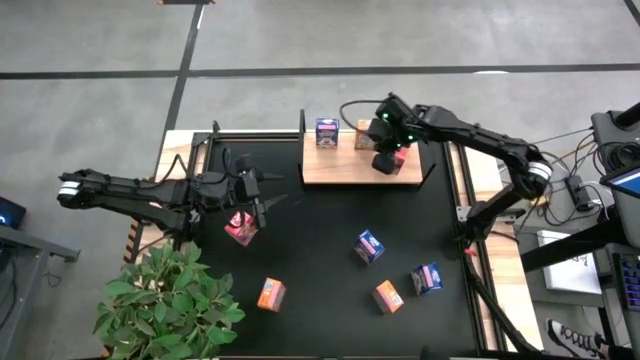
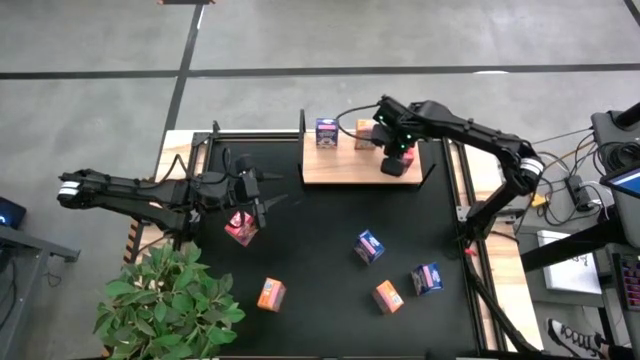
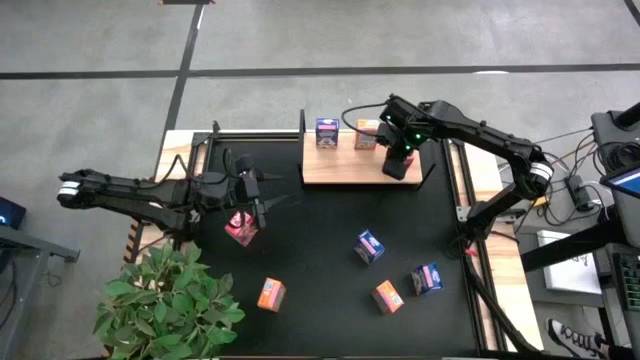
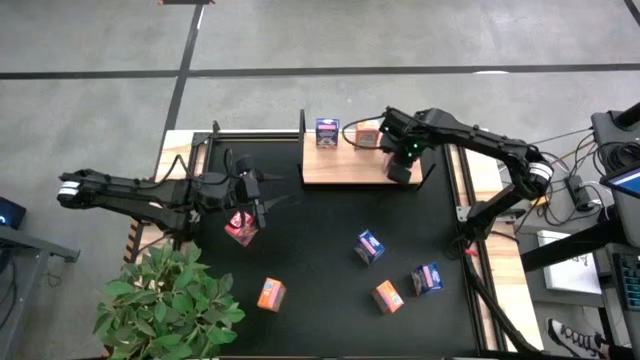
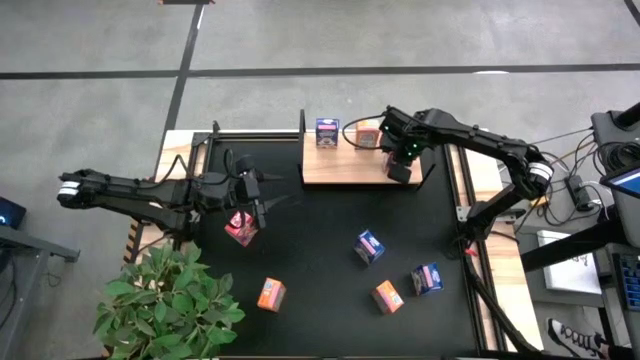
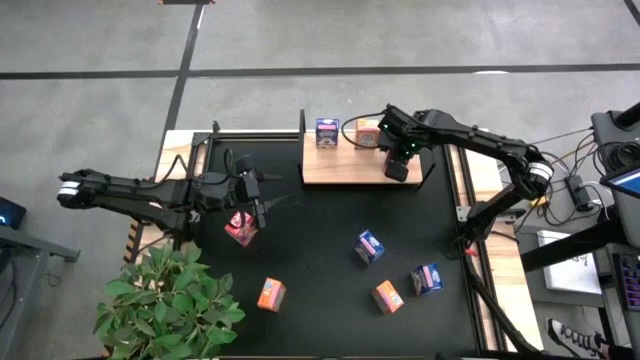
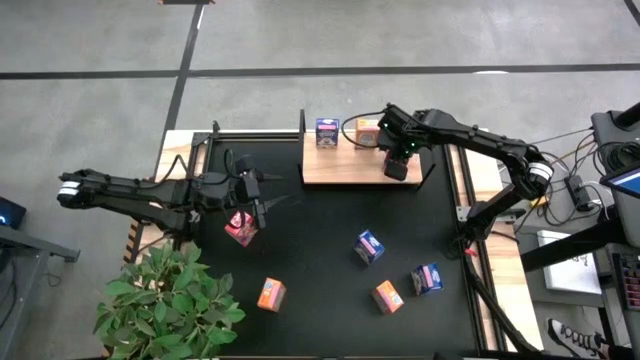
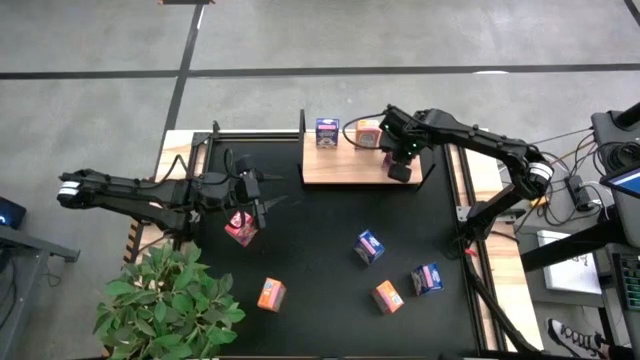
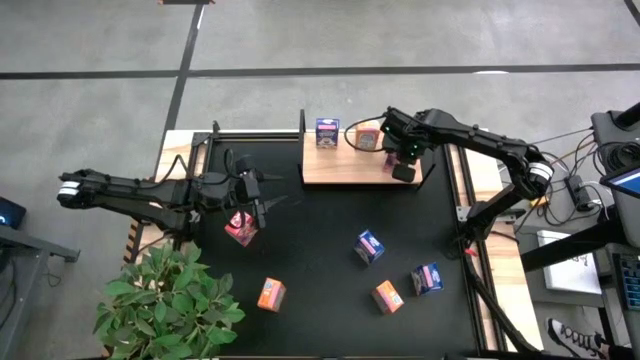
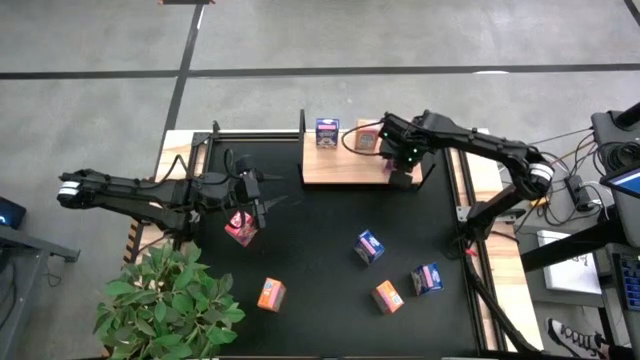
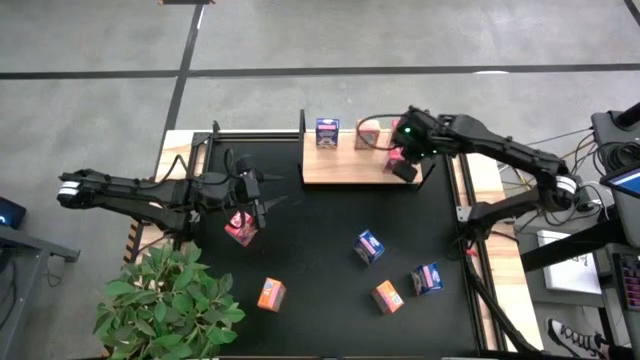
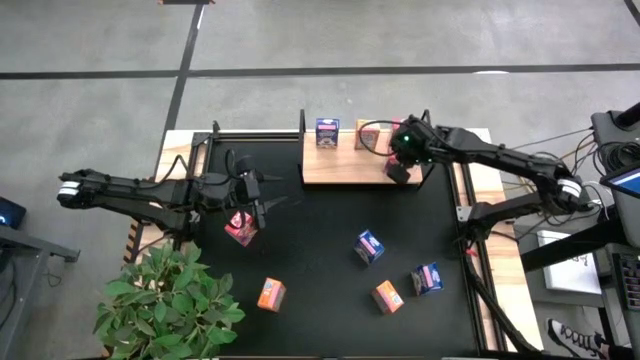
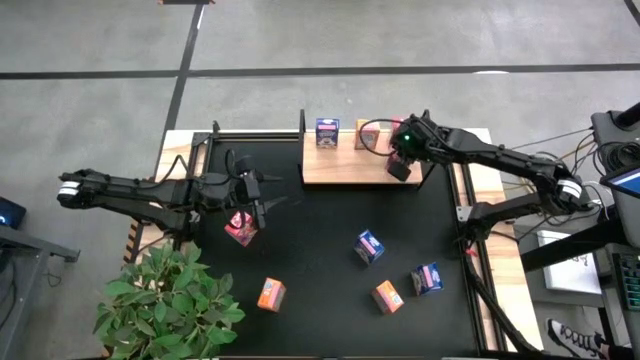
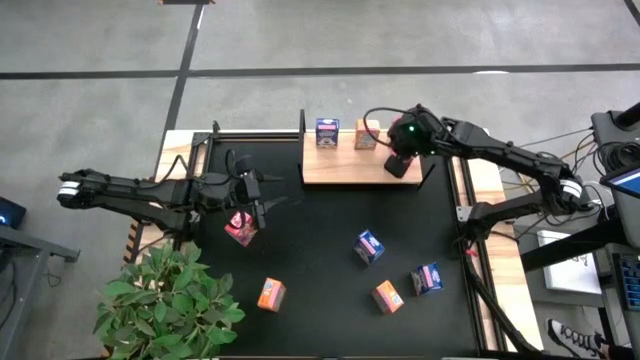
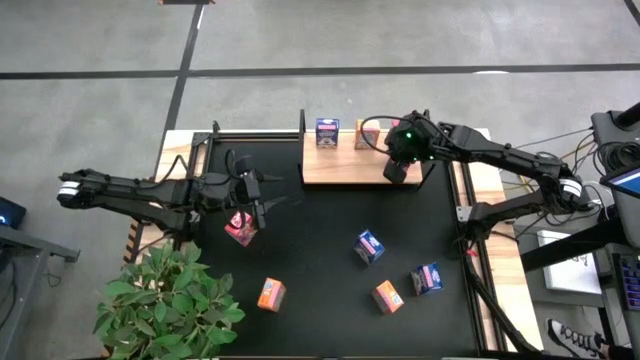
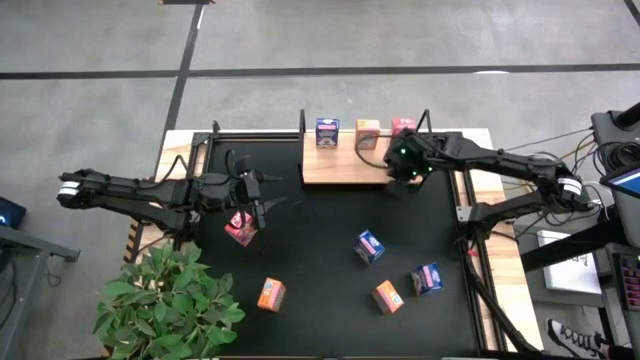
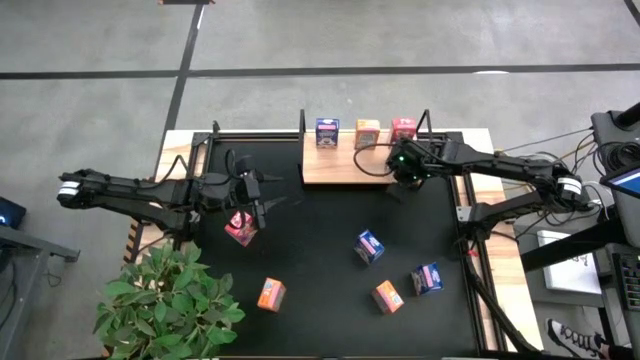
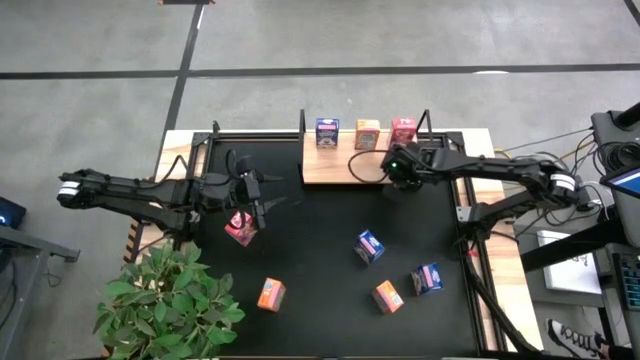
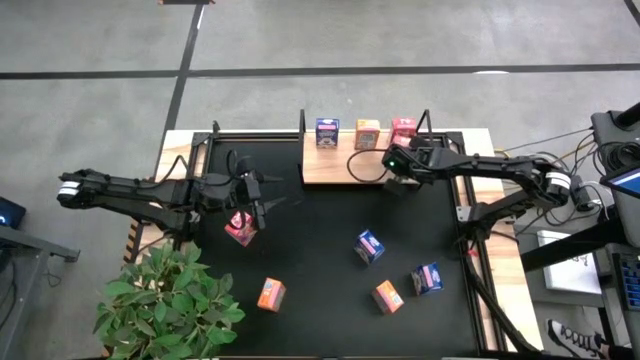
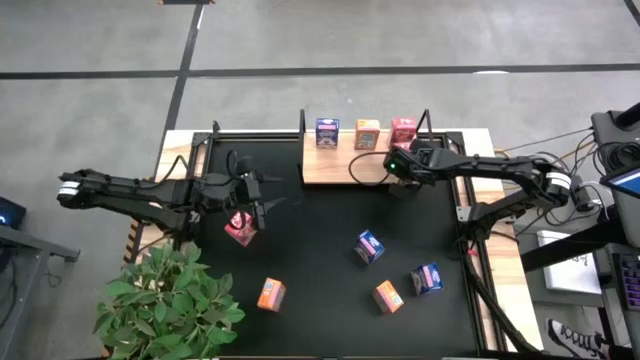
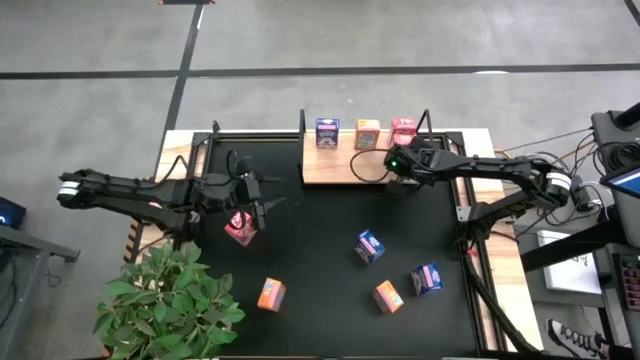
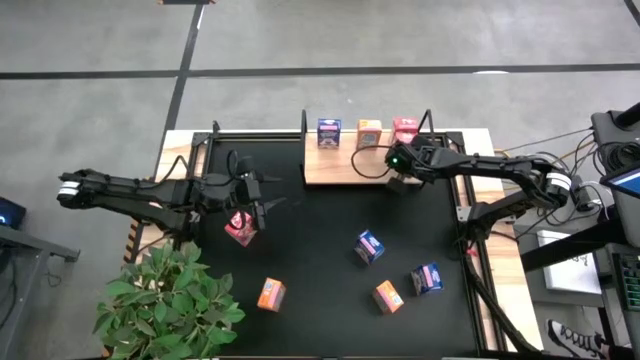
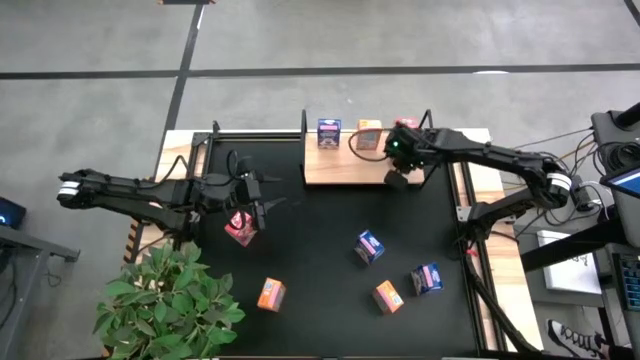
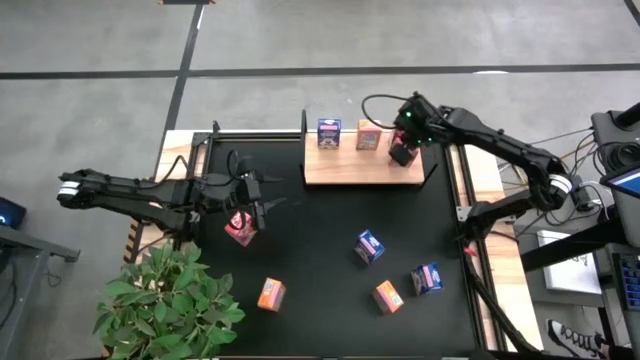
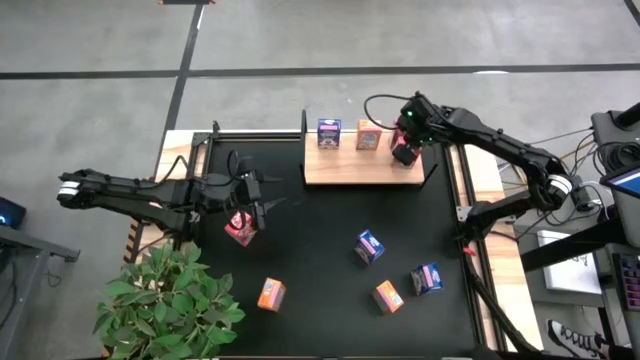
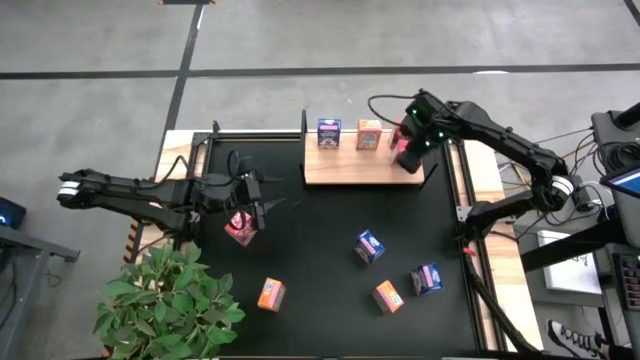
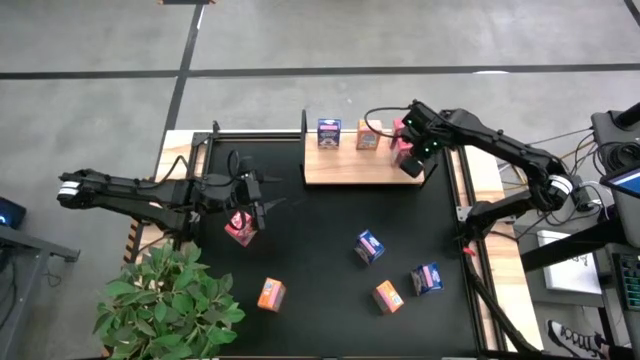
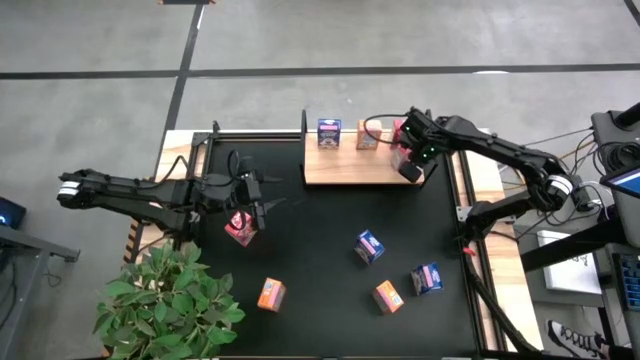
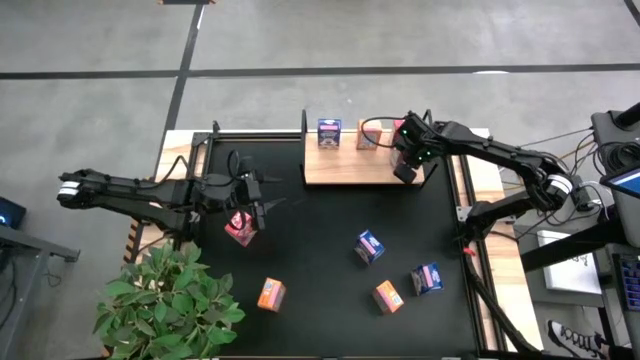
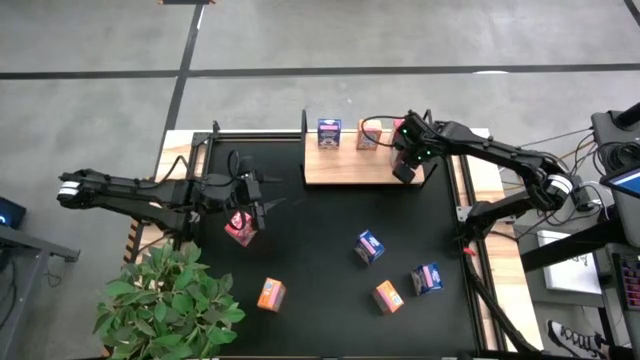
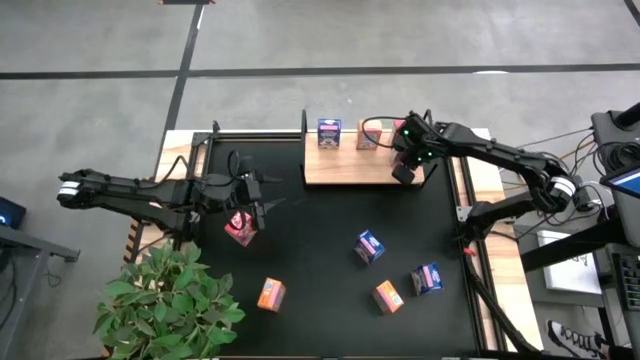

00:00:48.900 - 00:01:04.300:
Task: Stack cereal on shelf
Put the top red cereal box on the shelf aligned with the other red cereal box

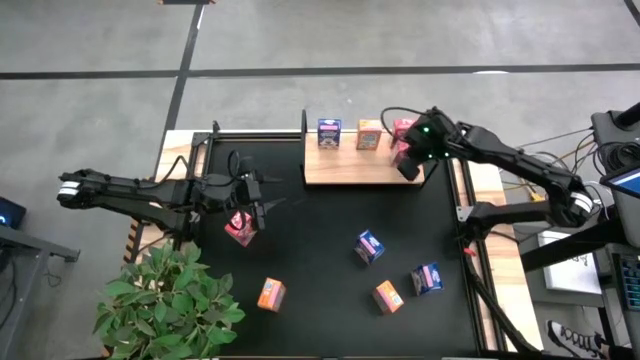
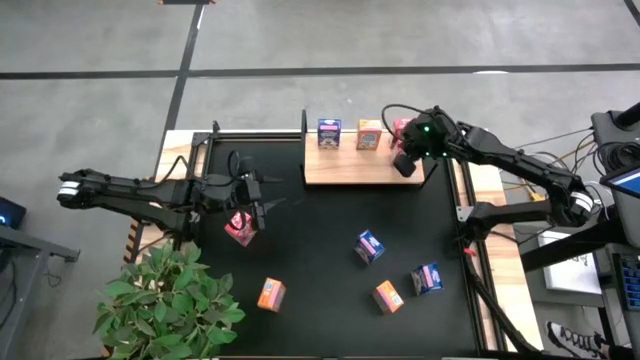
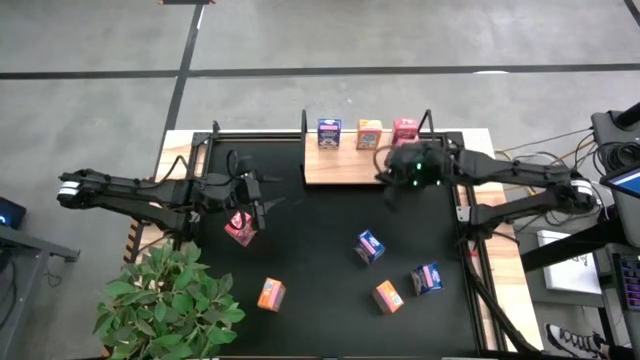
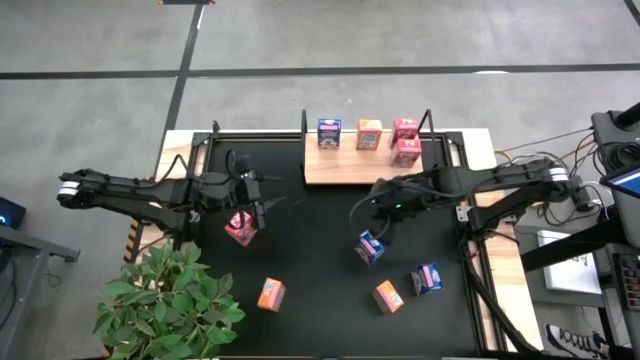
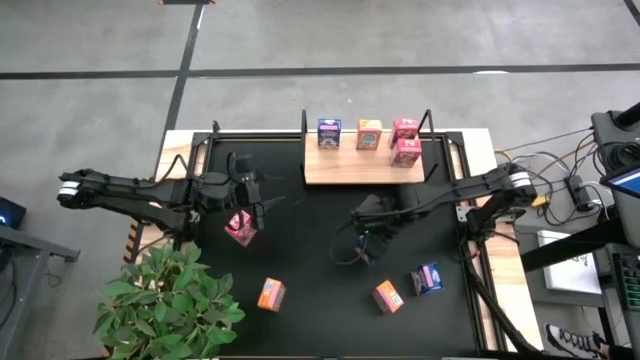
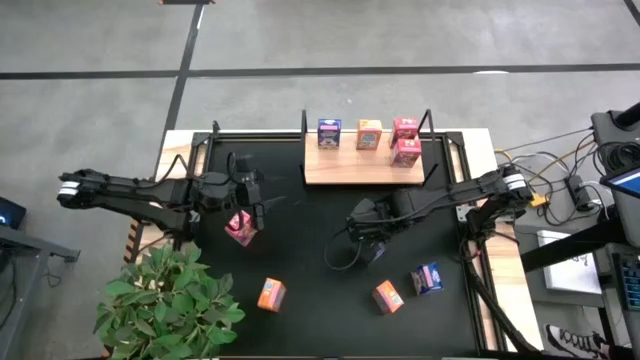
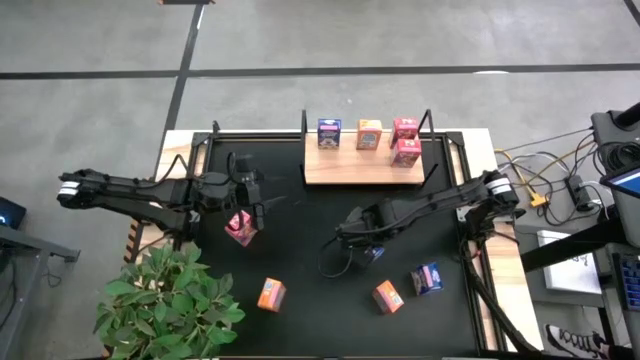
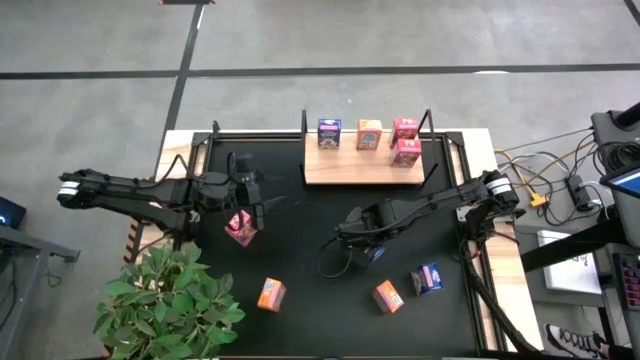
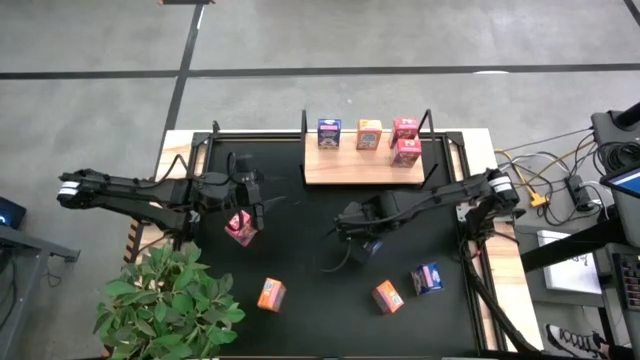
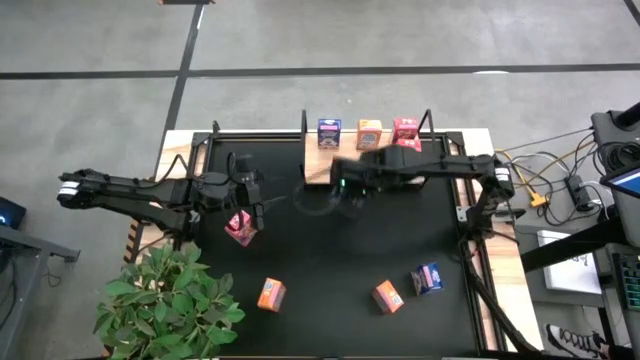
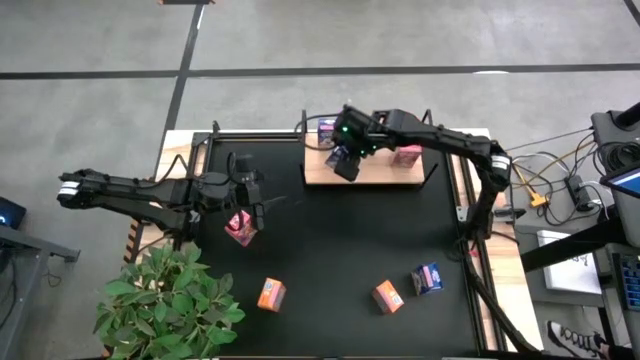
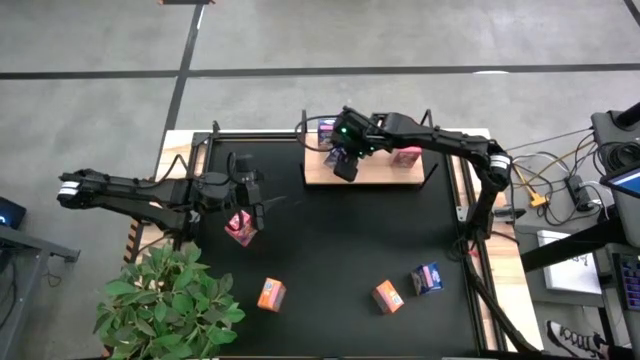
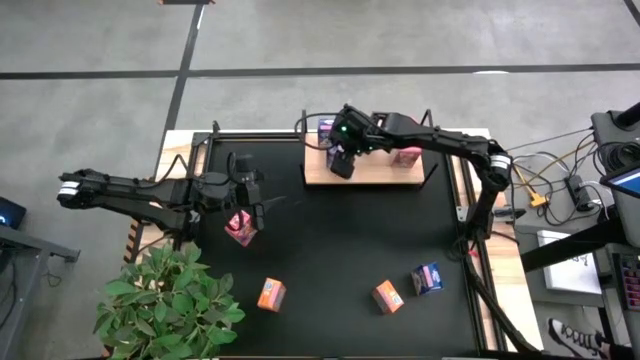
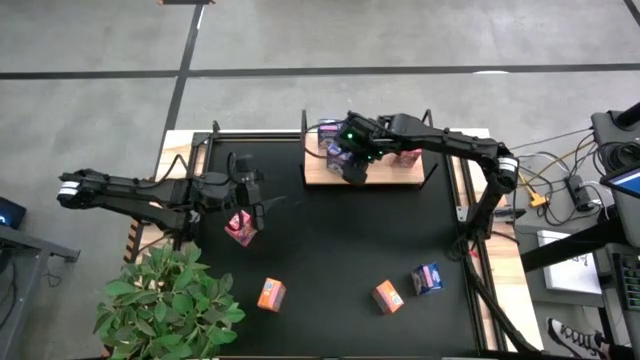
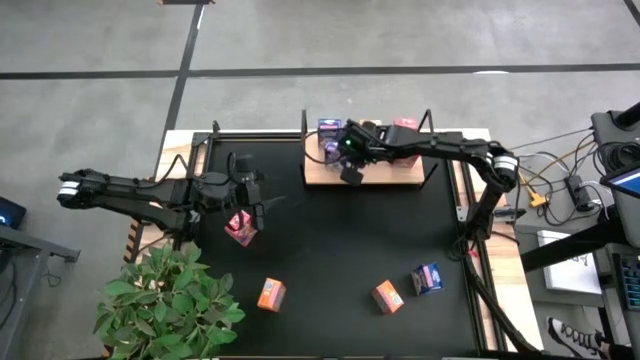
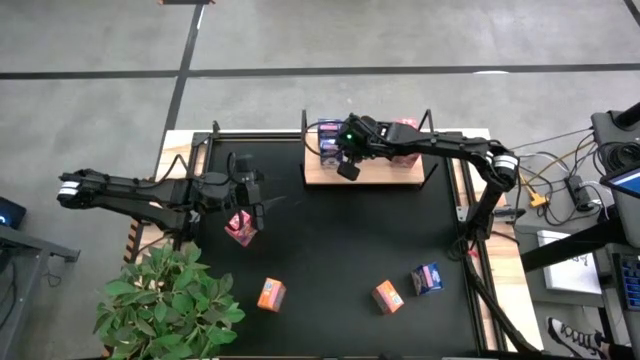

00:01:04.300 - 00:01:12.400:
Put the left blue cereal box on the shelf aligned with the other blue cereal box
